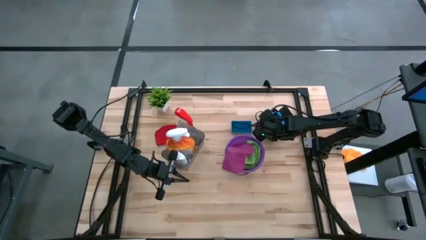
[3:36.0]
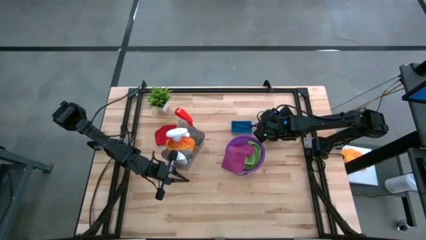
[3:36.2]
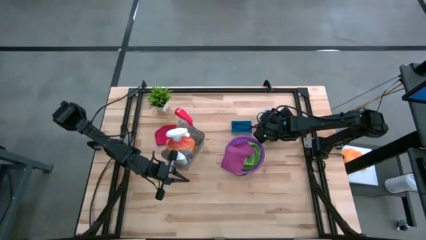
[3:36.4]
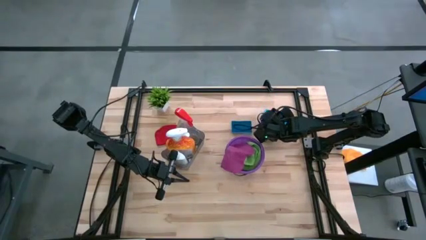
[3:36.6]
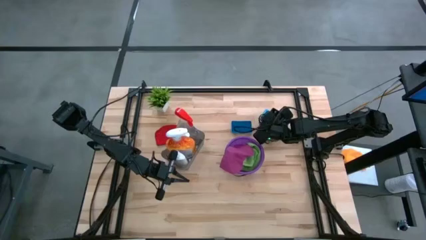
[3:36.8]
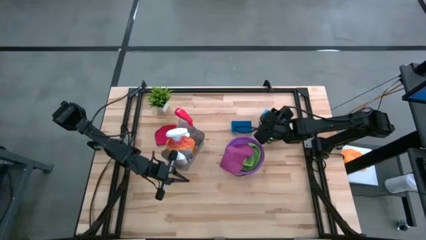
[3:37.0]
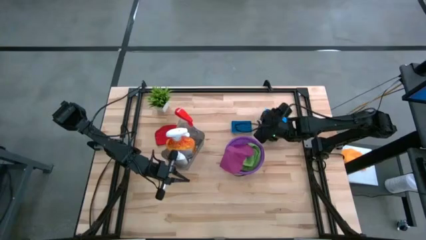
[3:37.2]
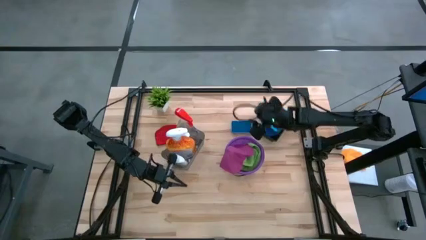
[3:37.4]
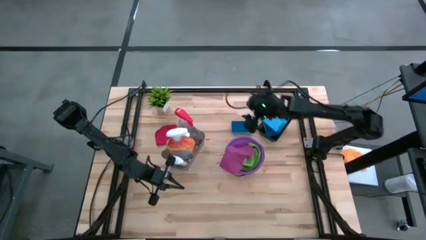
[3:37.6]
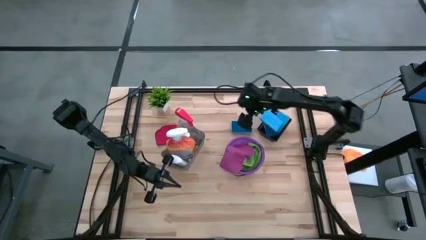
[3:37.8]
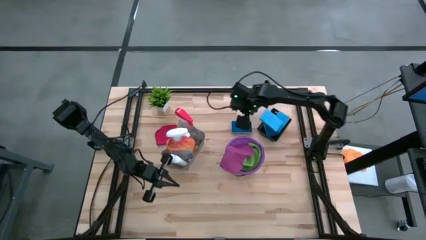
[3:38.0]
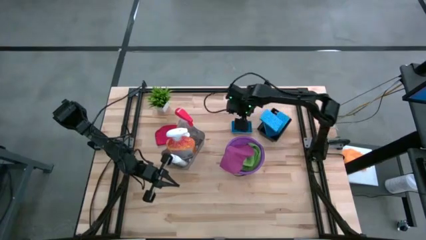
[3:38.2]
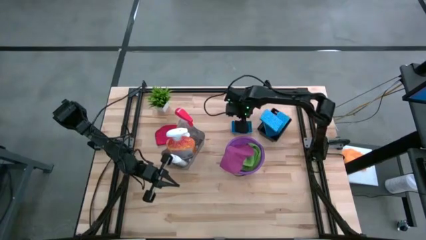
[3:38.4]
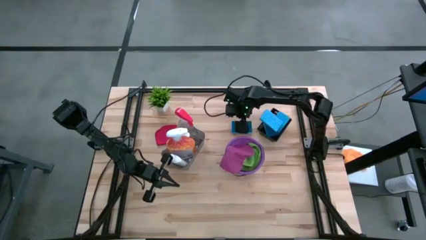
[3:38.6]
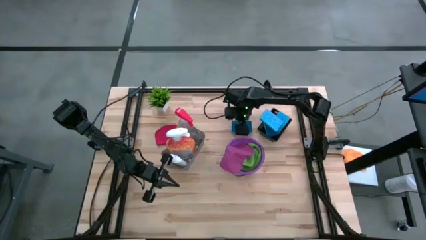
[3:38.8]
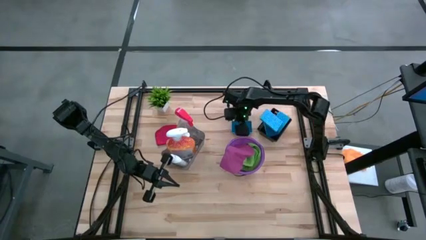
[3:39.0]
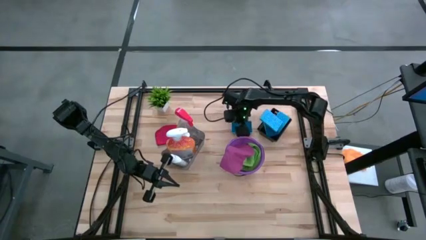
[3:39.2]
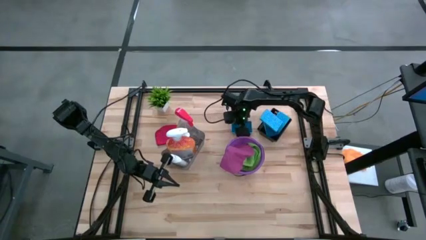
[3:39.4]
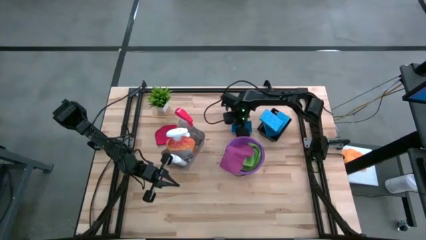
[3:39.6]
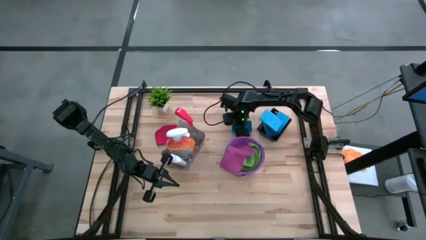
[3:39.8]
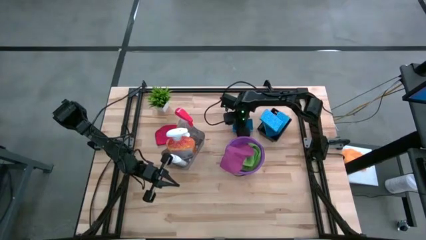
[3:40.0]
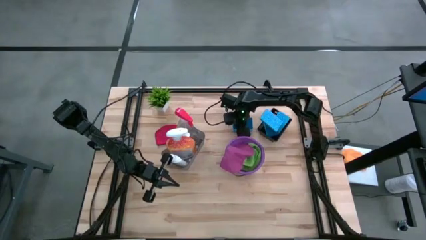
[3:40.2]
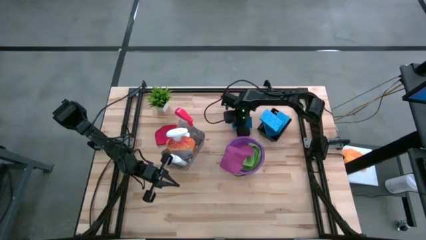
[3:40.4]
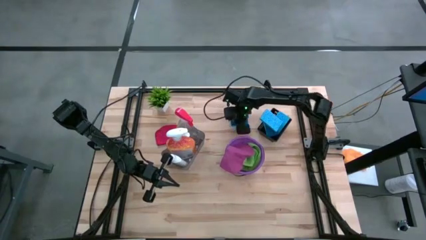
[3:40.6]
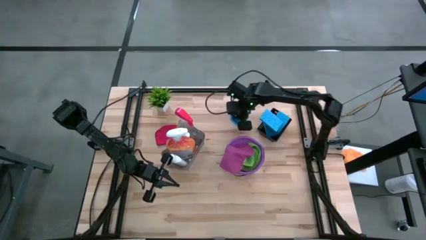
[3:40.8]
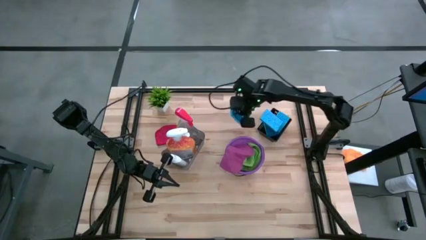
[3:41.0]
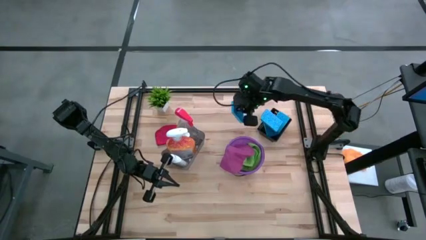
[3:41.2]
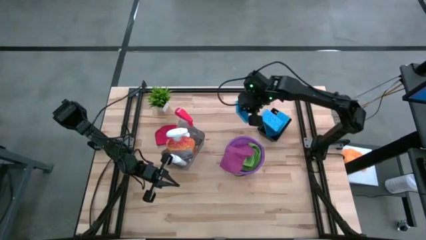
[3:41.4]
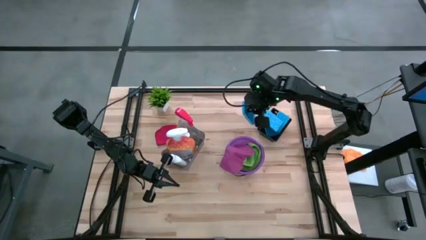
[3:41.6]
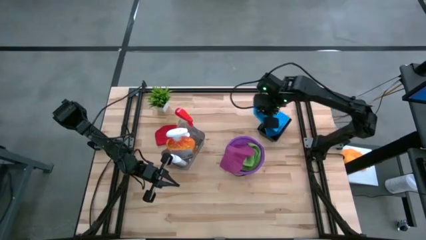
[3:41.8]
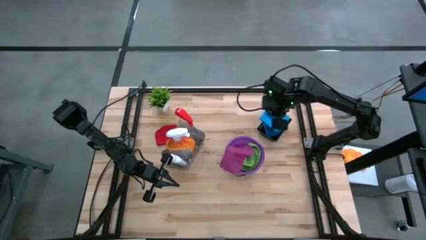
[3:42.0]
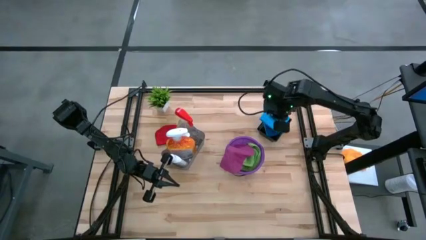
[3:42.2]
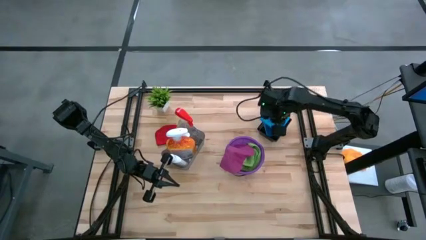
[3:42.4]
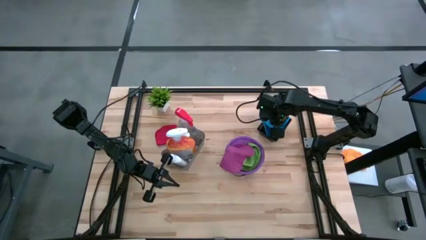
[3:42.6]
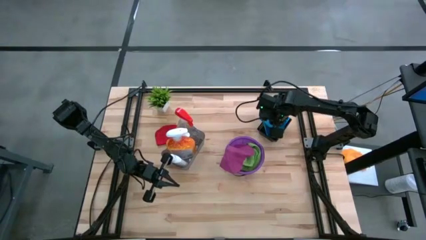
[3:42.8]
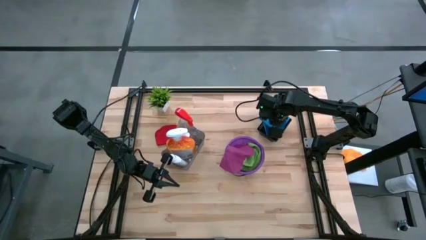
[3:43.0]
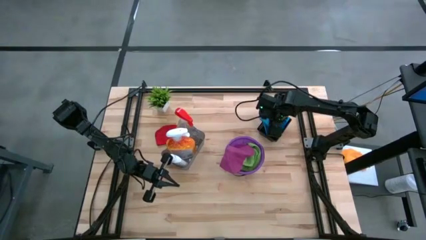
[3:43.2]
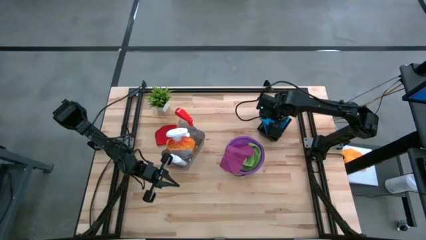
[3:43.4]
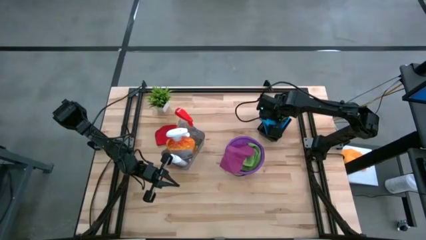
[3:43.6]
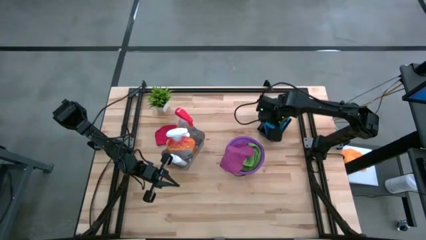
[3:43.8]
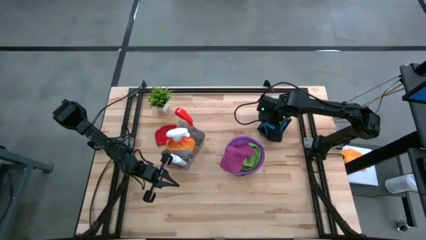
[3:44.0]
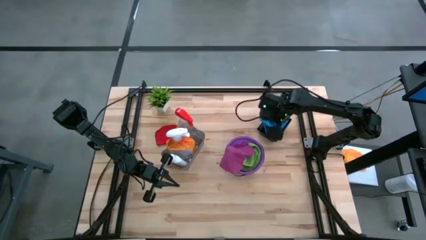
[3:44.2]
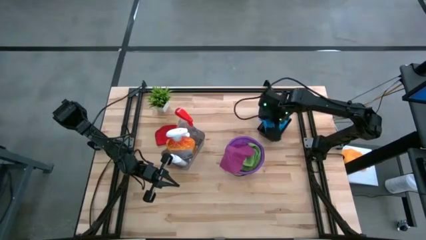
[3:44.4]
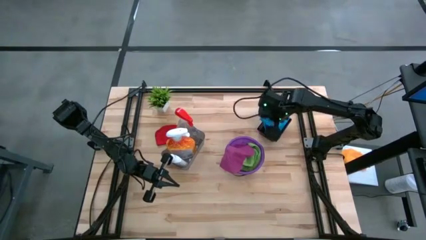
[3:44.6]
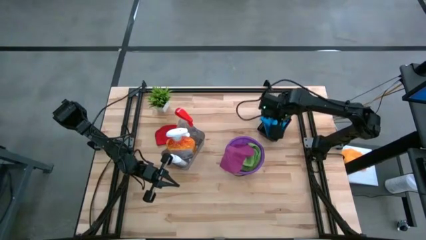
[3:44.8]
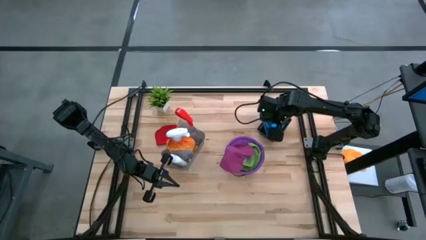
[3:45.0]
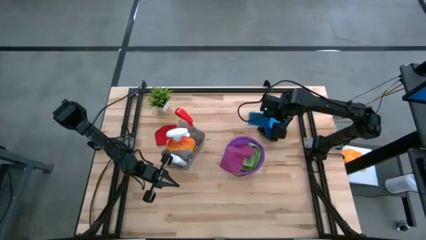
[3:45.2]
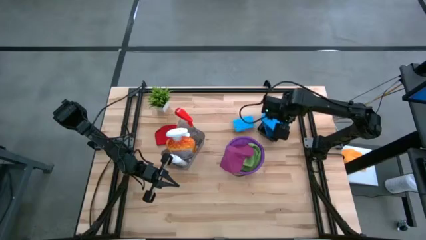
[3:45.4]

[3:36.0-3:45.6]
Task: Pick & Place Kitchen Items
Put the blue sponge wipe into the black bin

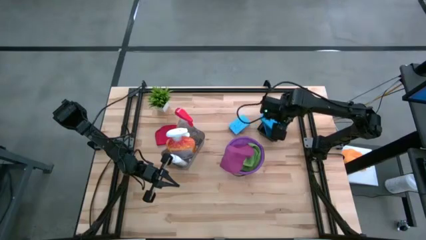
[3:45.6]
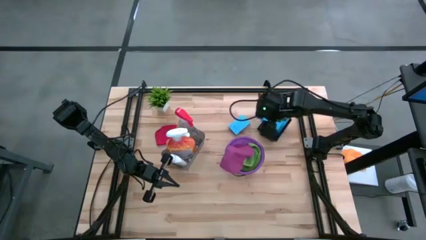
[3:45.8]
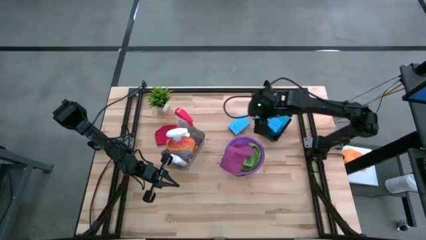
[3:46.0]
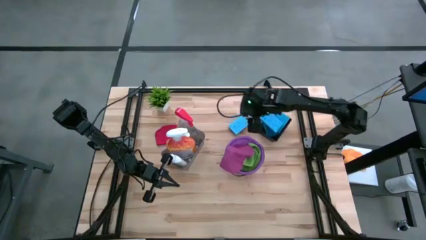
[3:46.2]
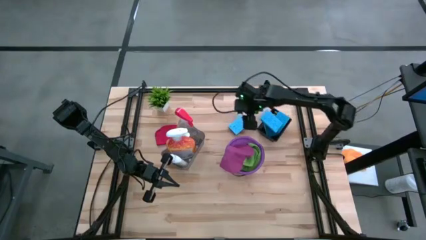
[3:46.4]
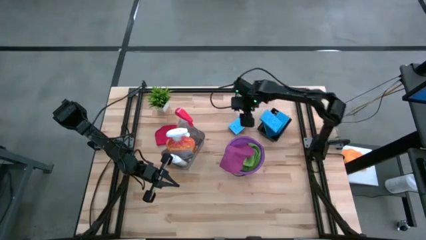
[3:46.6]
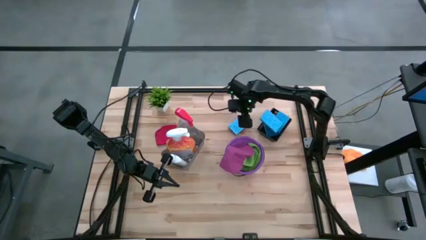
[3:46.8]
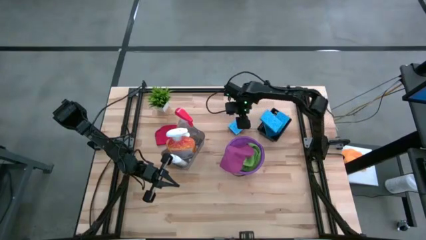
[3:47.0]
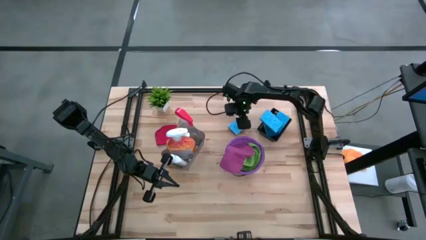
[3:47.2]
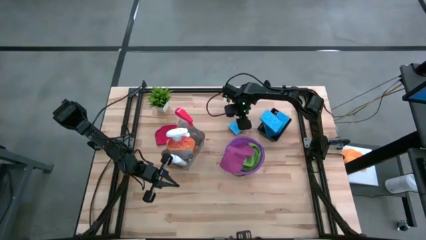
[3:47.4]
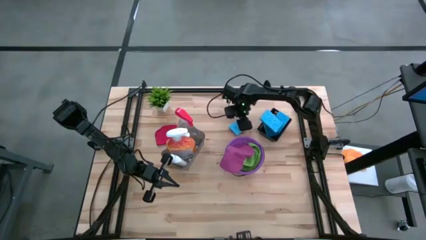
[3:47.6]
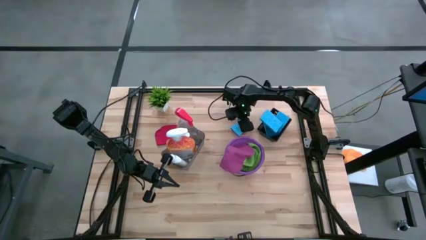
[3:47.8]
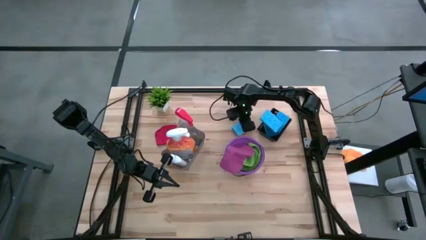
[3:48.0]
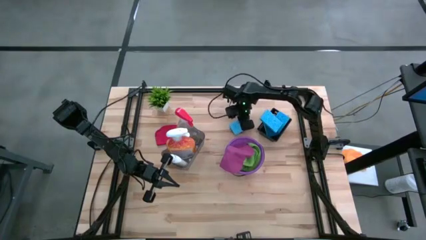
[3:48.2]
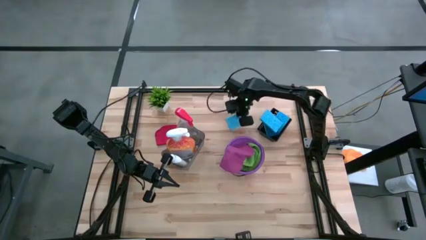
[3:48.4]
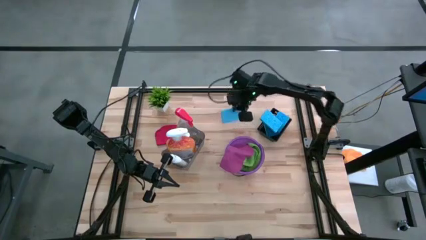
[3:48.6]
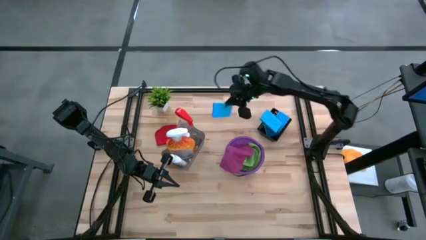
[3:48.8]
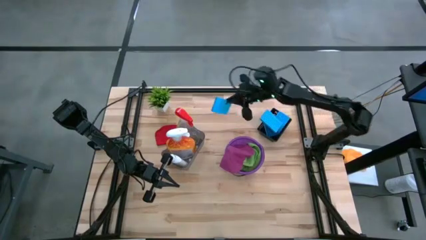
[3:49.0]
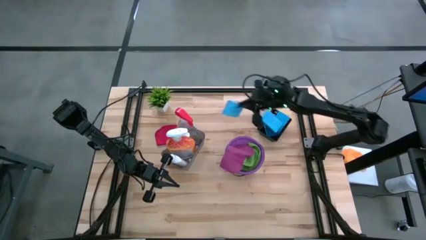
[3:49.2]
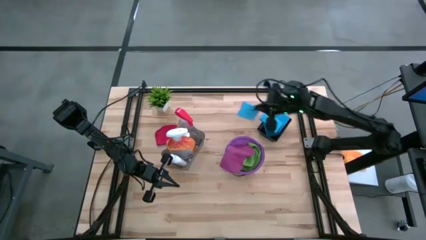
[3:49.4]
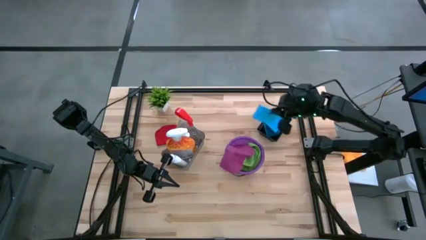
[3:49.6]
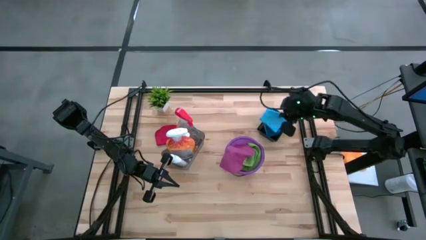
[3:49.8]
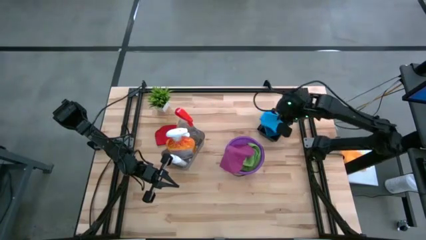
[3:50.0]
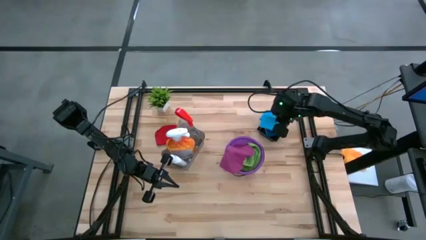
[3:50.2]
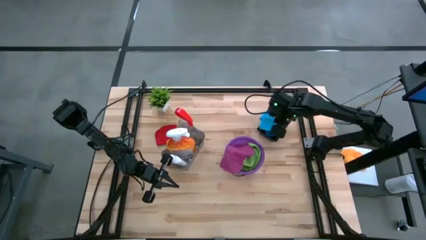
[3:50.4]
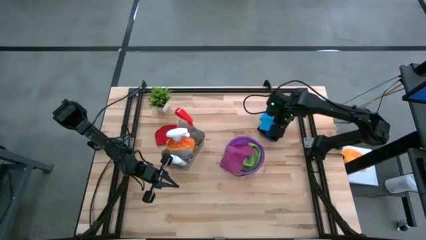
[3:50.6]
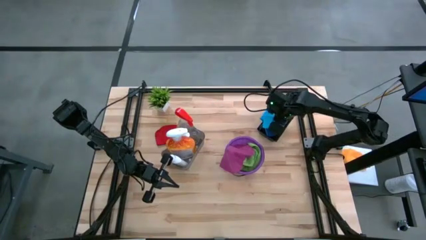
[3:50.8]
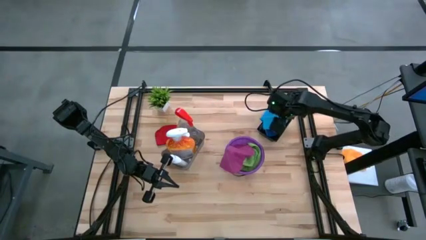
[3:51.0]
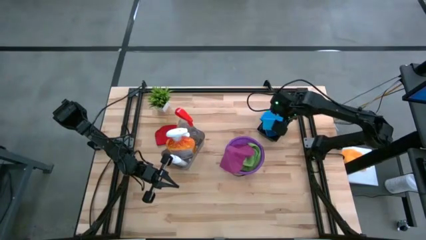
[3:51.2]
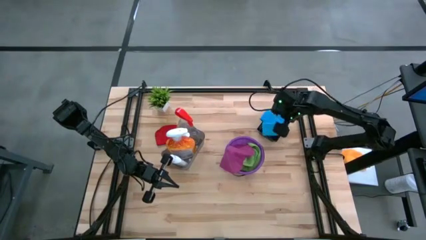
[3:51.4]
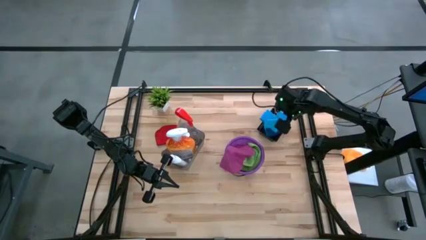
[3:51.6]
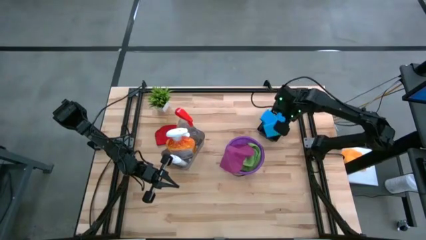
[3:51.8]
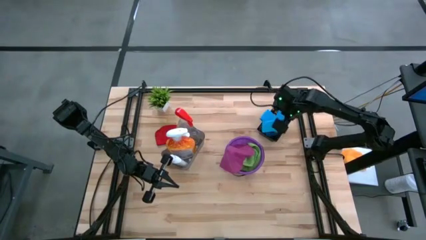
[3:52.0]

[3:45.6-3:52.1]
Put the blue sponge wipe into the black bin

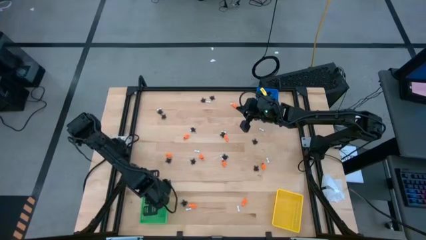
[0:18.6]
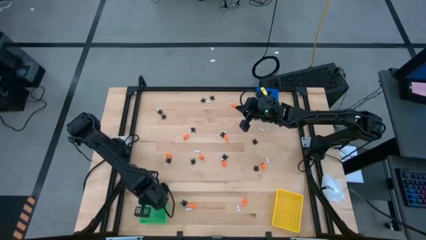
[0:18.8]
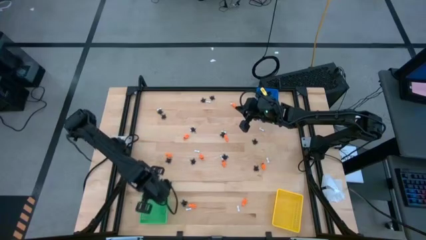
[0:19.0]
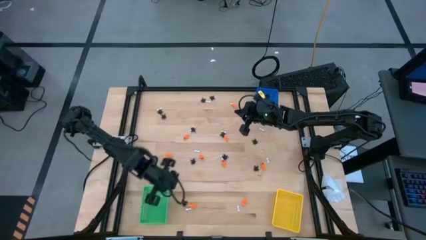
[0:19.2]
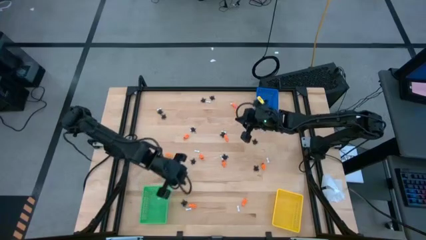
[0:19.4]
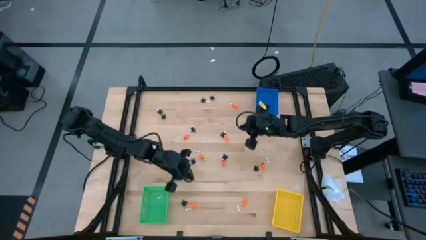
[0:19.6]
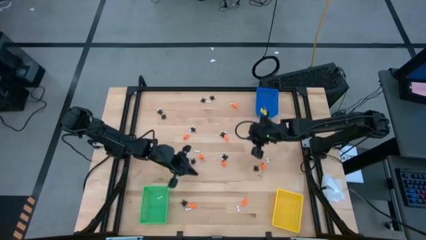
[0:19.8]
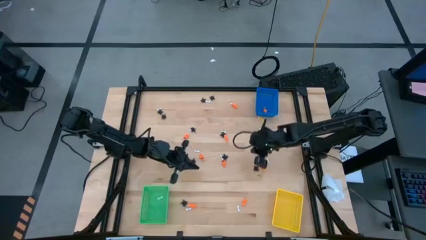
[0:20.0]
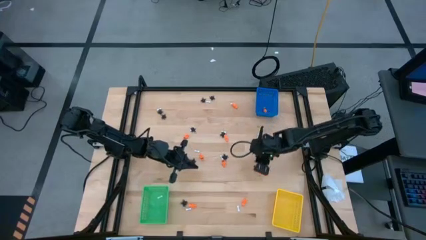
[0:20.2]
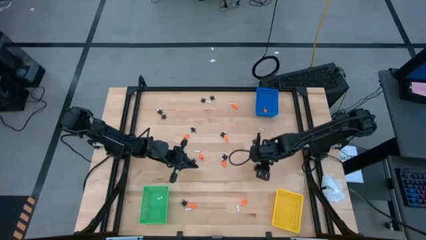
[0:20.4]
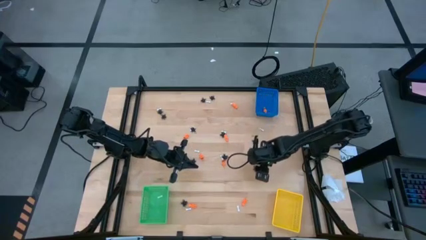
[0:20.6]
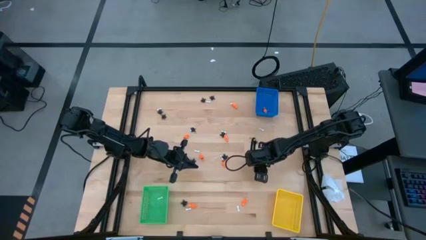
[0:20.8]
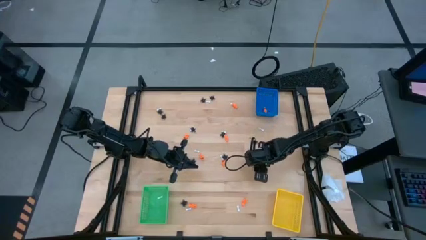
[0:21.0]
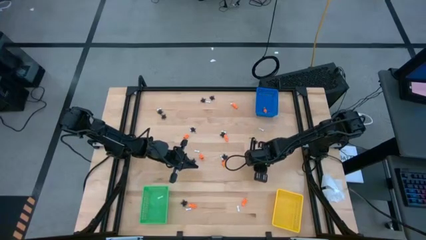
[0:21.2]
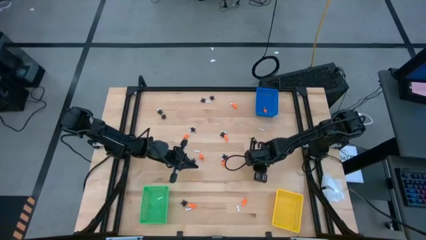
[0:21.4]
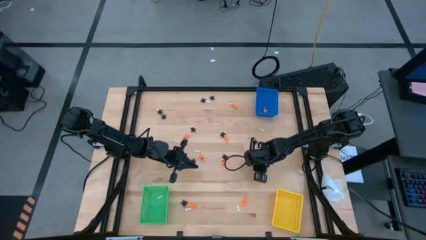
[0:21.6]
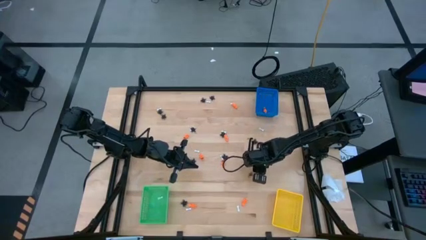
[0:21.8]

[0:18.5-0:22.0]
Task: Sort Halloween decoration
Put the black spider toy into the yellow bin
